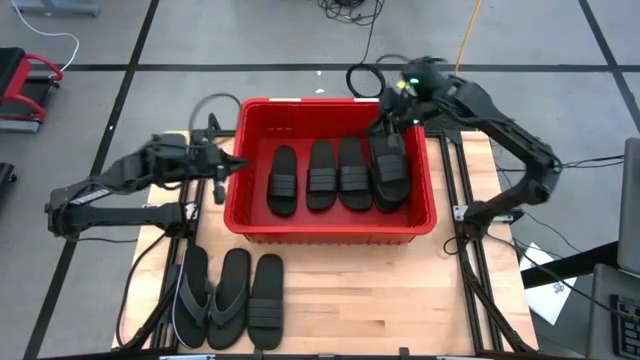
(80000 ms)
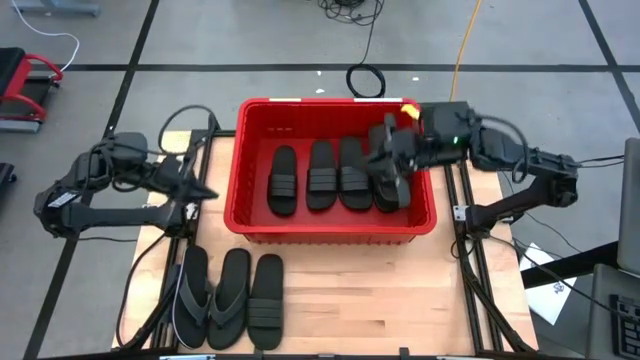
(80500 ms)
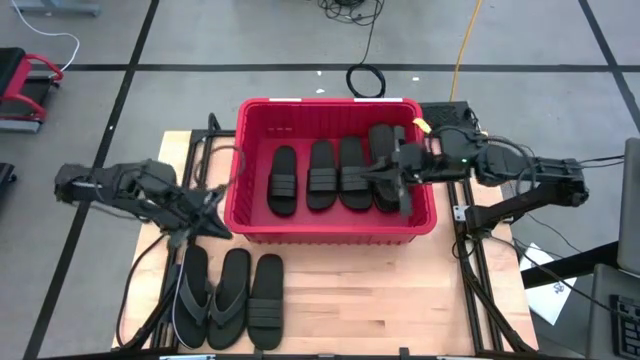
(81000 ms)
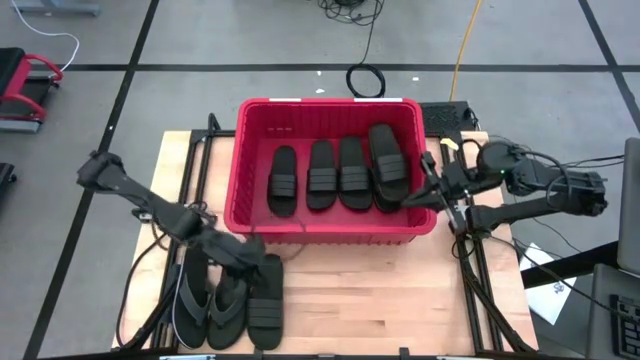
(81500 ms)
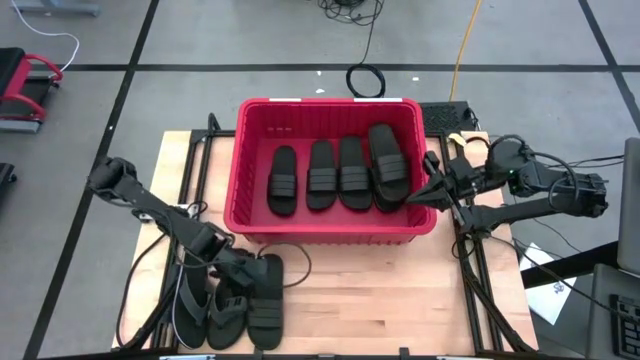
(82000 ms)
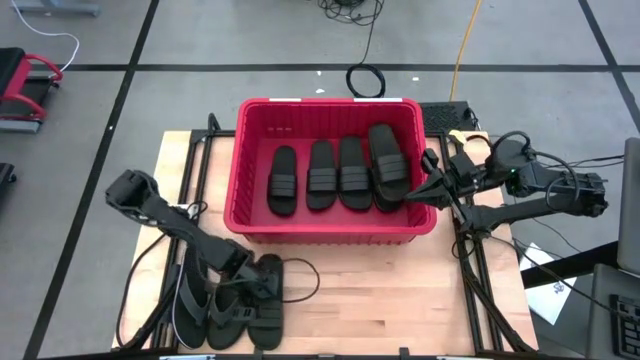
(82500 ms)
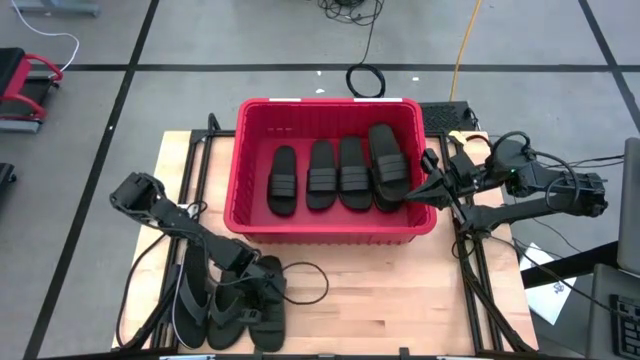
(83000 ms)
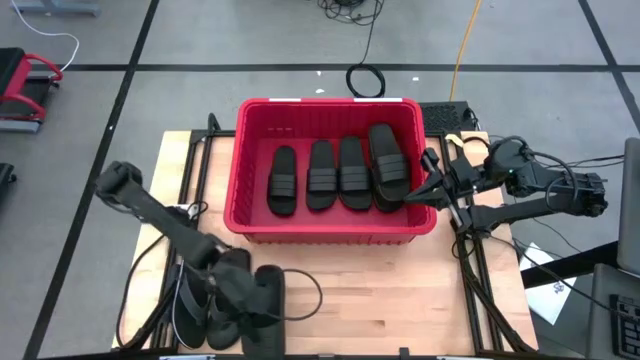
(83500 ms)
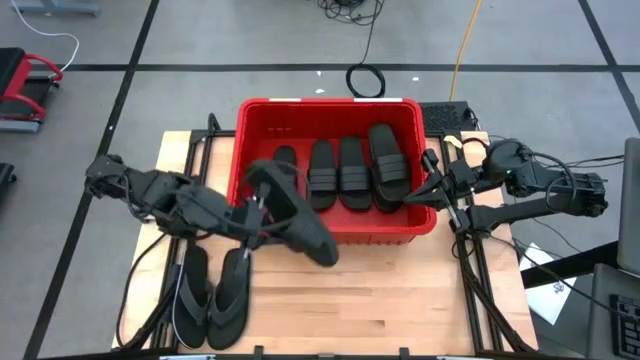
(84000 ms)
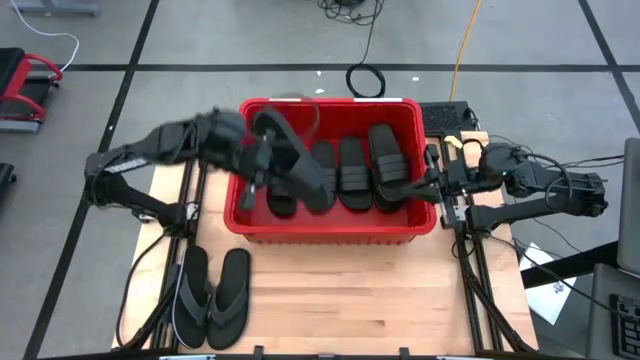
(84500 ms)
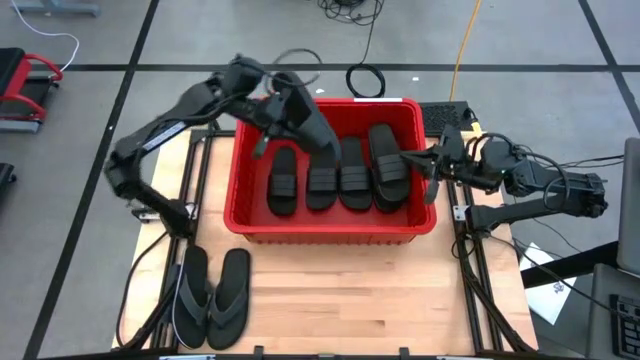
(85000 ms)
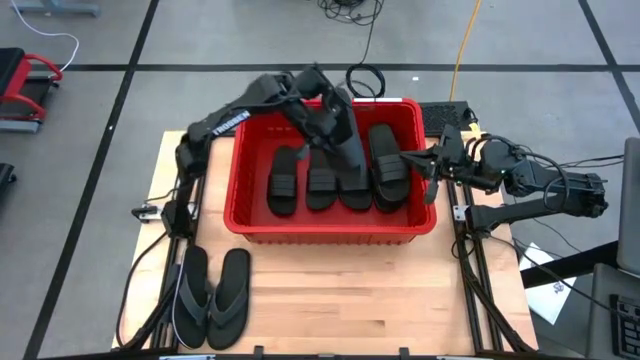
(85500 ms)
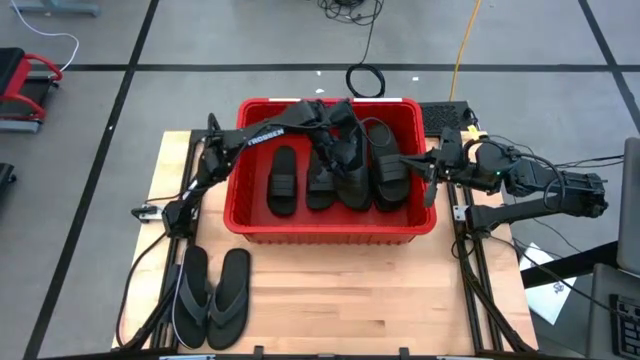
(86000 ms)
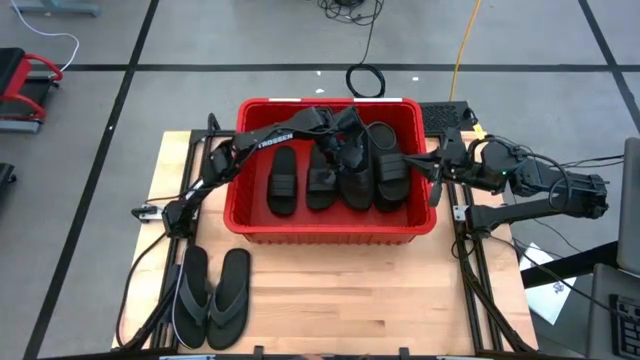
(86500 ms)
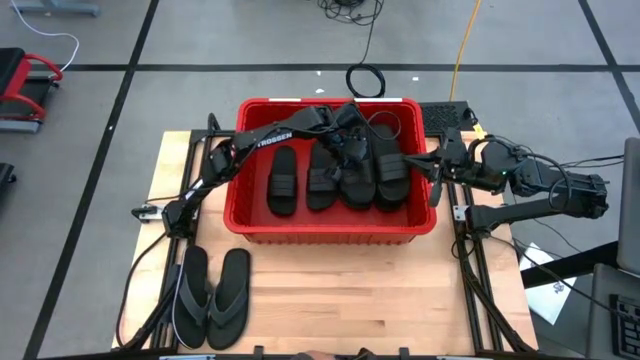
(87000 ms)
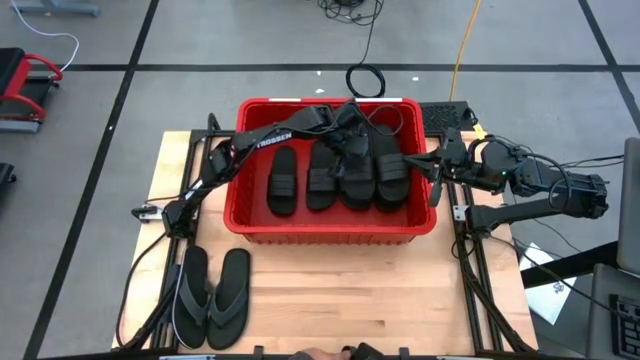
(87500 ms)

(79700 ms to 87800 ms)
Task: Pick and place slides into bin
Put the black slipper into the red bin

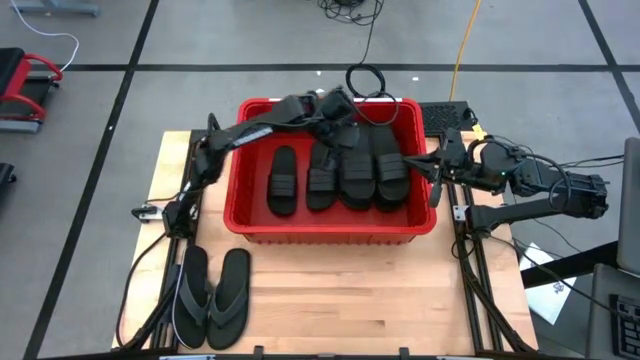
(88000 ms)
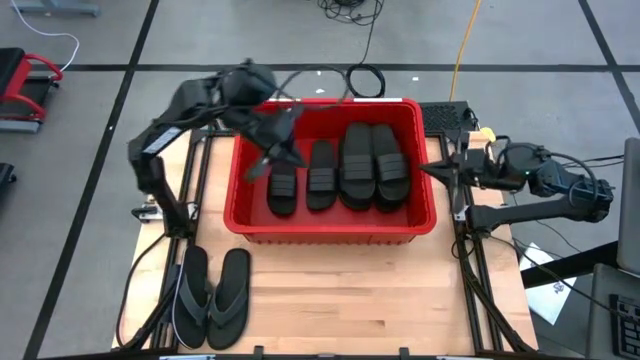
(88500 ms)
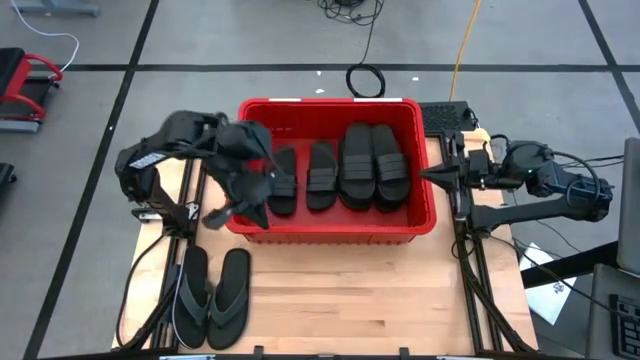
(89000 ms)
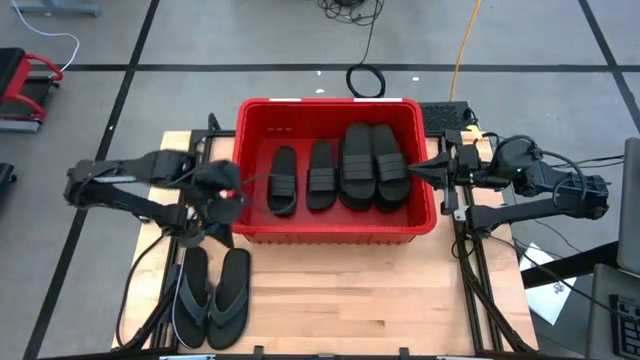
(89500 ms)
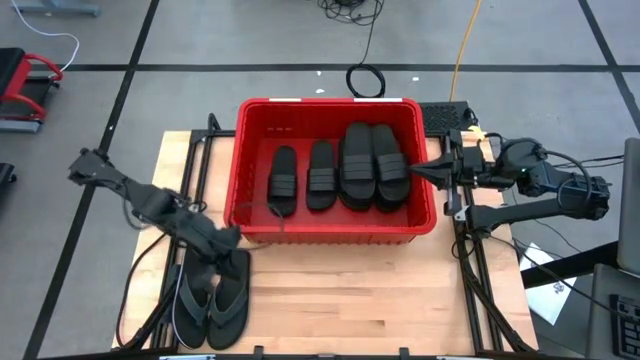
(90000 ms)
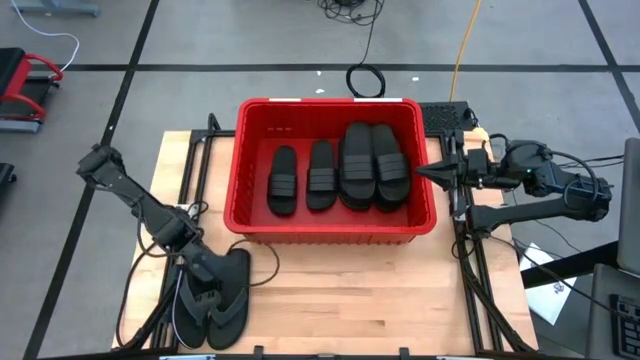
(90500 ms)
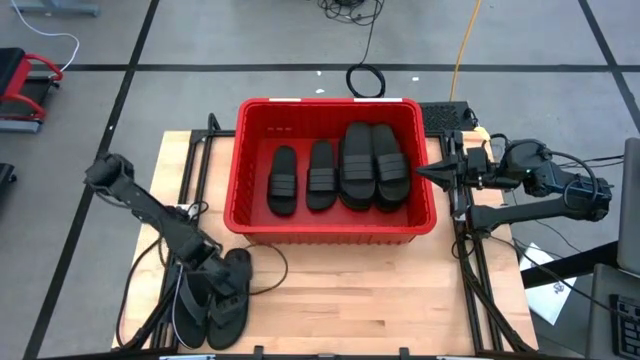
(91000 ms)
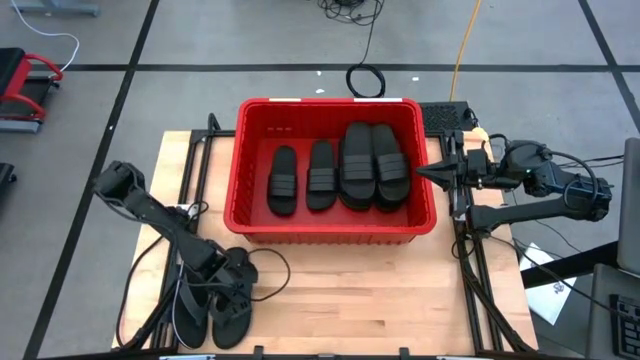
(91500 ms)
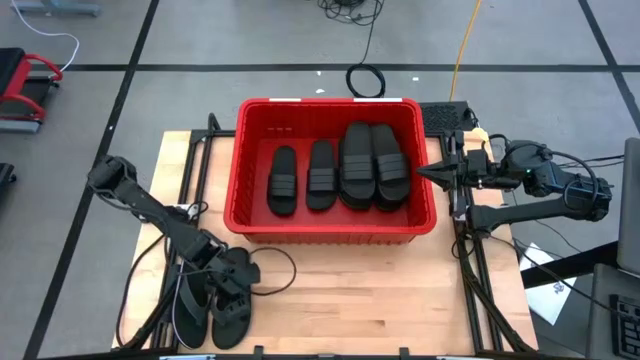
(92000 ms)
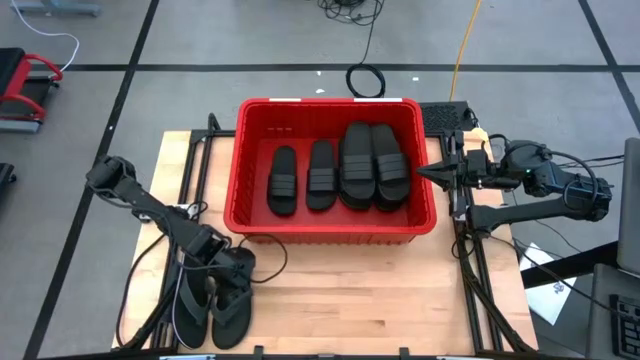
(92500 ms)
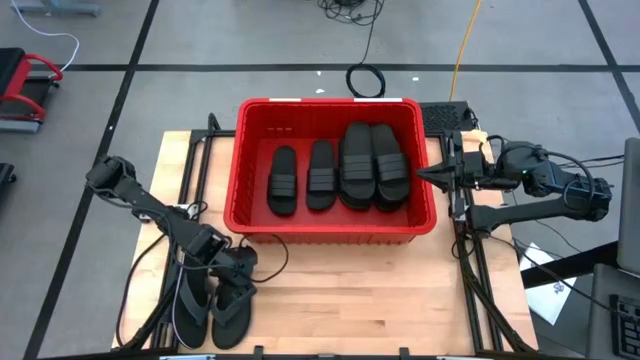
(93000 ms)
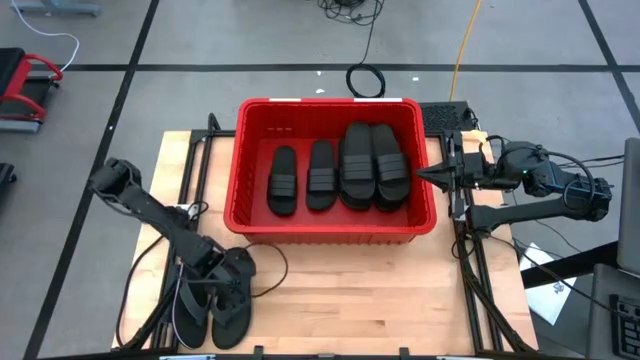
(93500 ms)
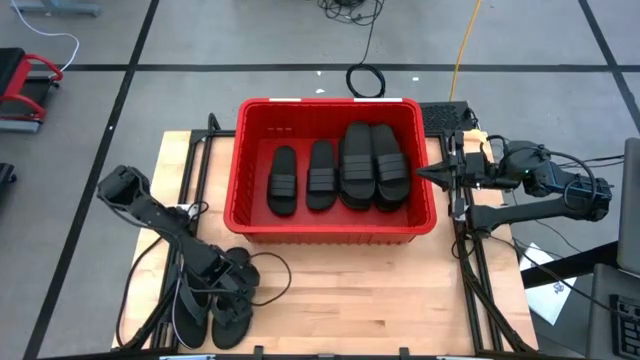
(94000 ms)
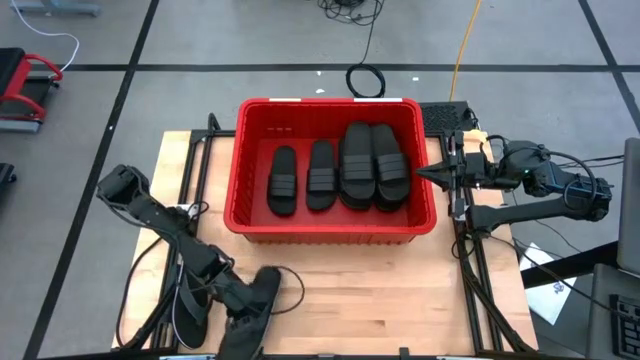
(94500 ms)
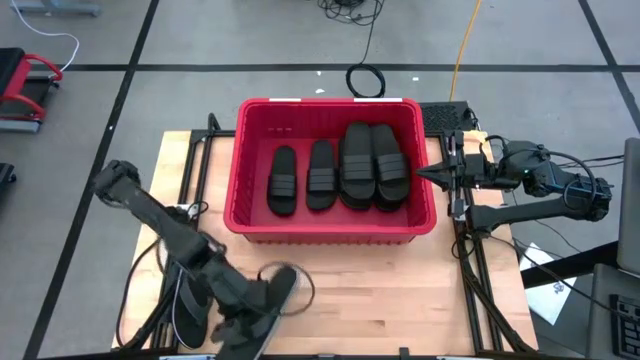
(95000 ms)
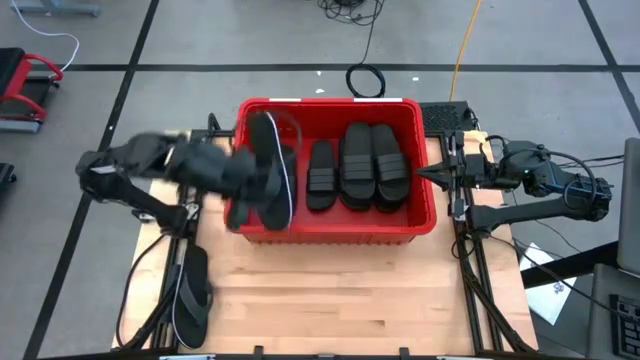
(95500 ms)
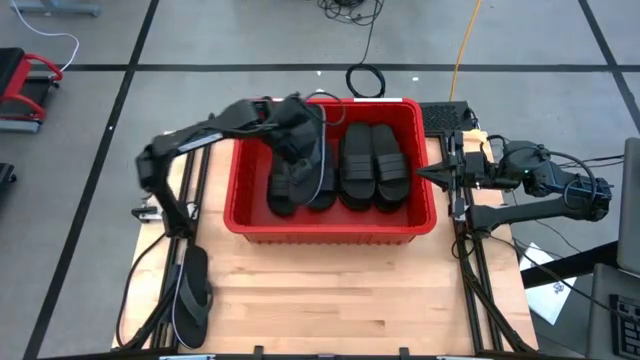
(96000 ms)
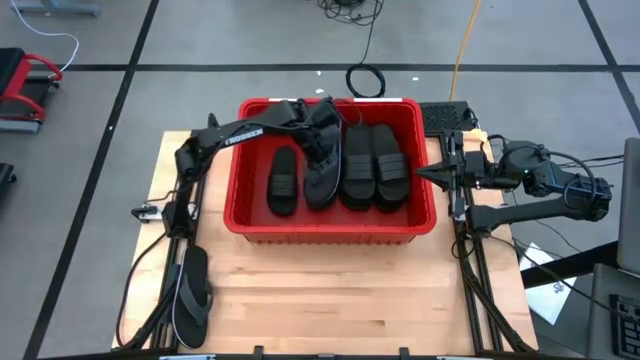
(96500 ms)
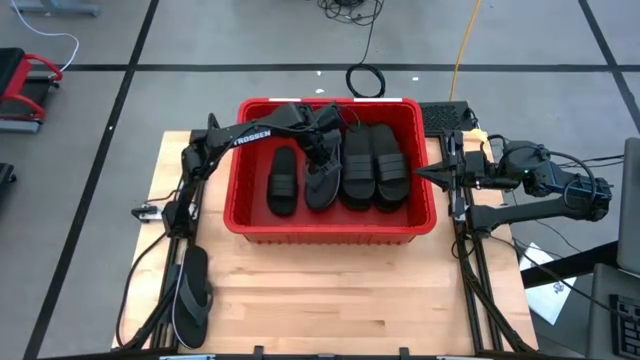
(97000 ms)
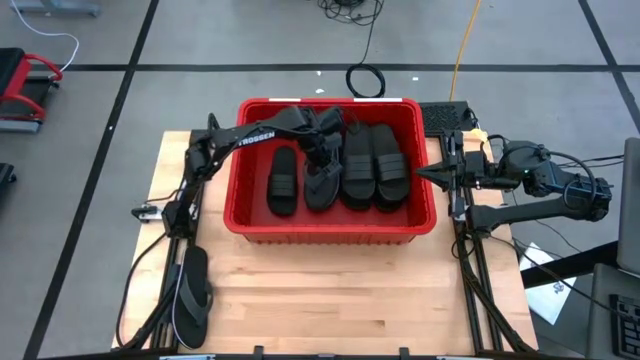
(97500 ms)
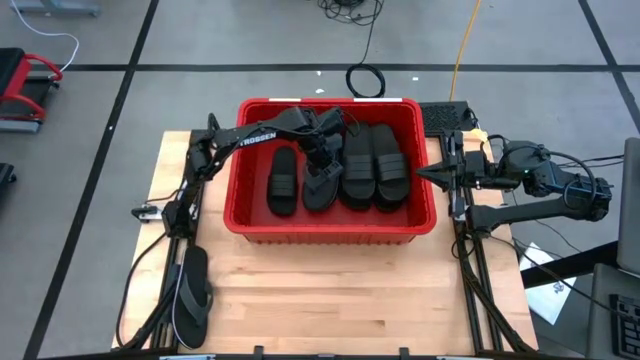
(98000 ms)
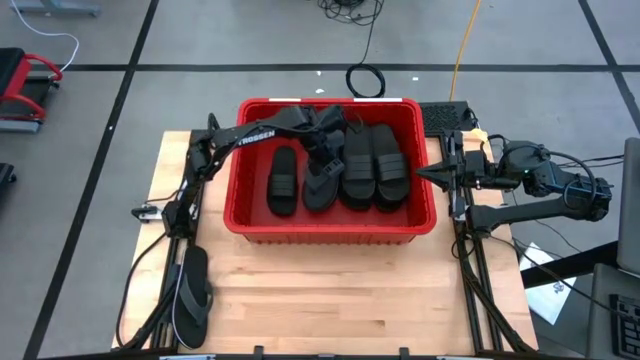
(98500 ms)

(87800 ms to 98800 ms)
Put the black slipper into the red bin

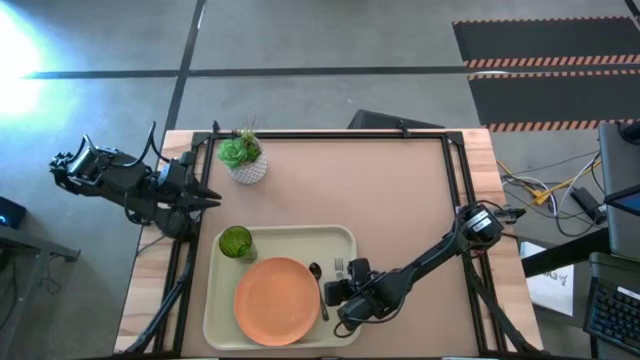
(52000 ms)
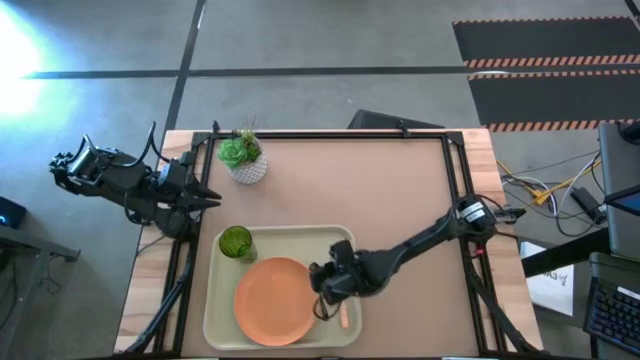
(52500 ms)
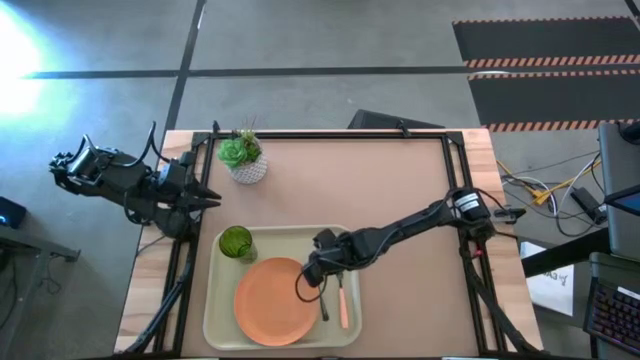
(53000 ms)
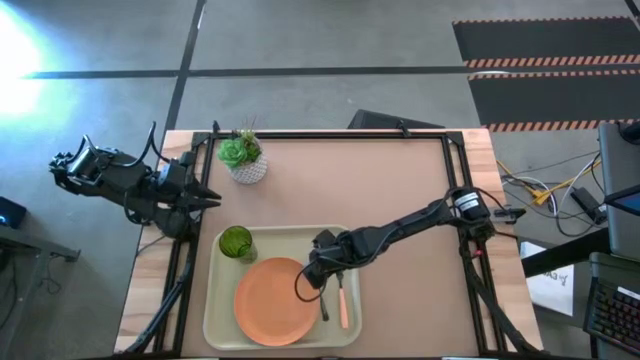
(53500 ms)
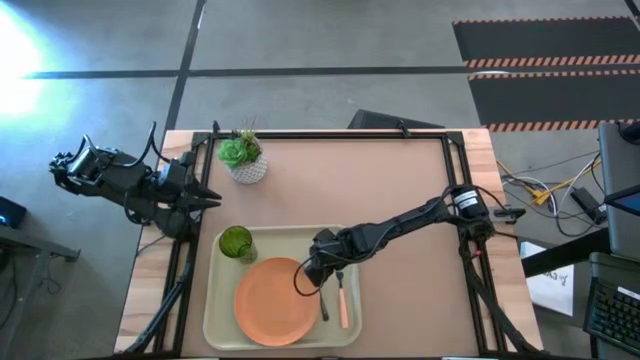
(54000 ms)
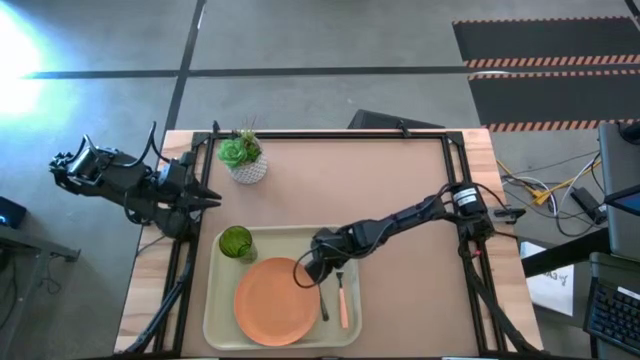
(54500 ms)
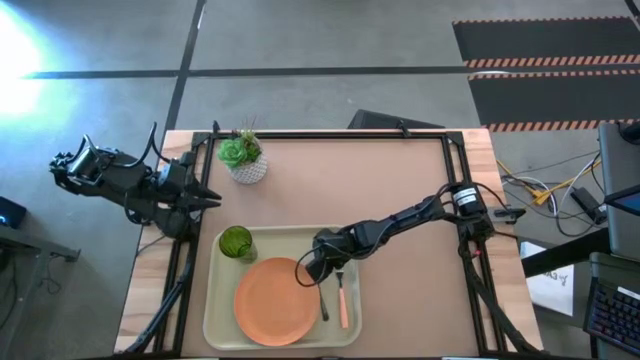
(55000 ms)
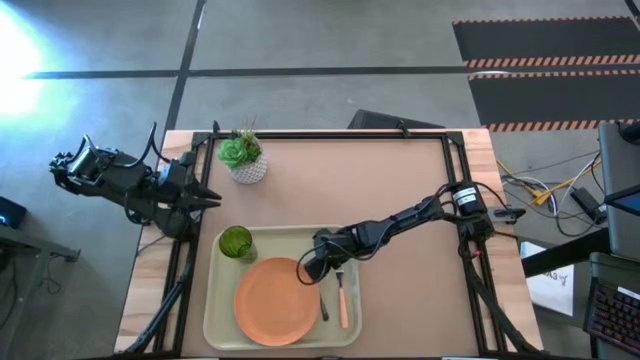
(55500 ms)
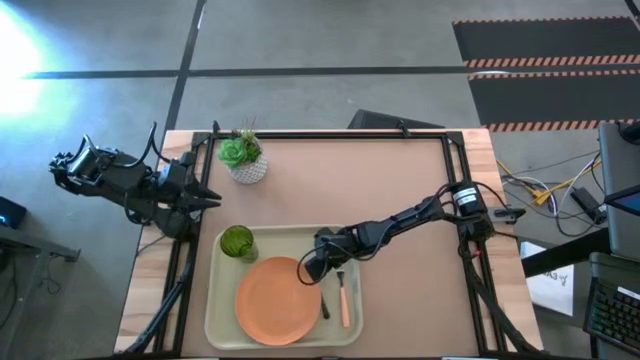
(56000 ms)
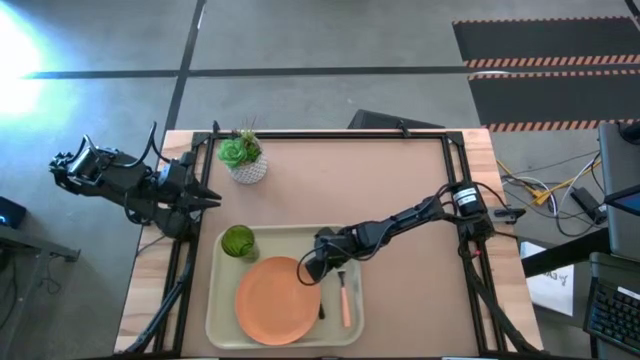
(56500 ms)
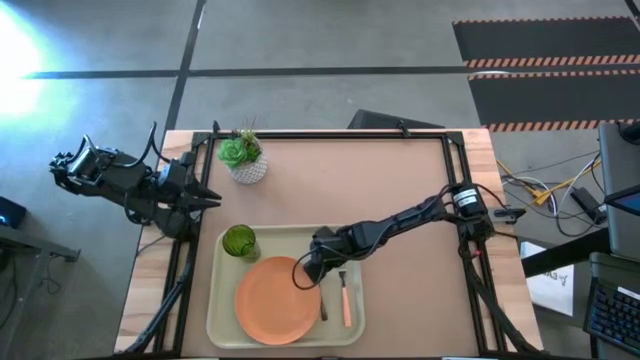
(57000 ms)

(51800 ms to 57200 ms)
Task: Pick and place plate/cup/fork/spoon on tray
Adjust the black spoon on the white tray
